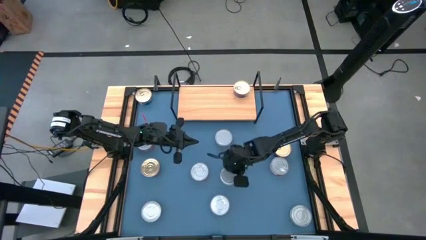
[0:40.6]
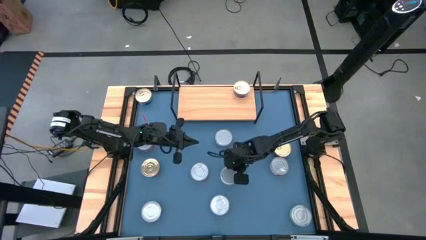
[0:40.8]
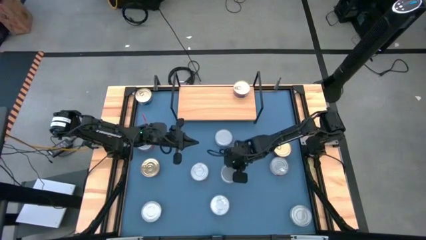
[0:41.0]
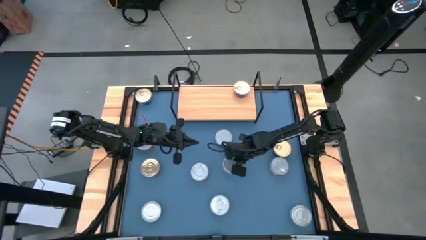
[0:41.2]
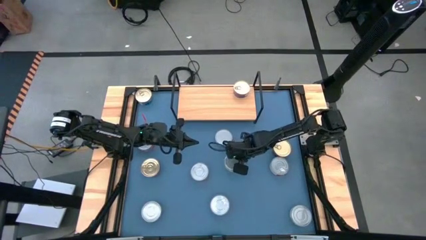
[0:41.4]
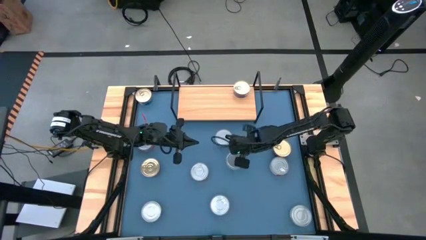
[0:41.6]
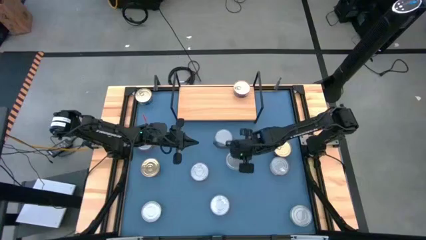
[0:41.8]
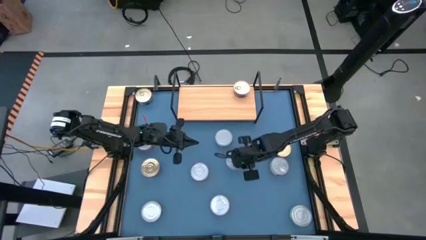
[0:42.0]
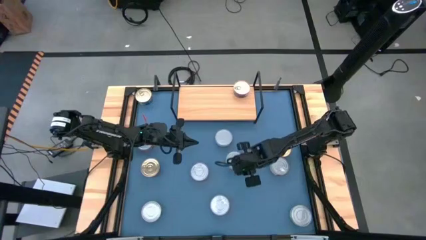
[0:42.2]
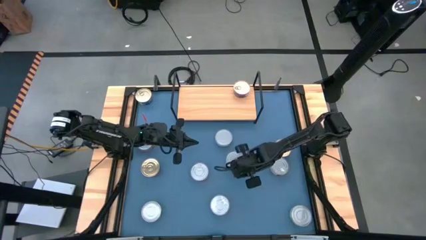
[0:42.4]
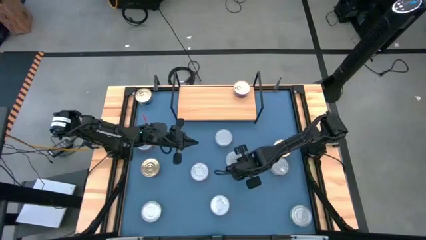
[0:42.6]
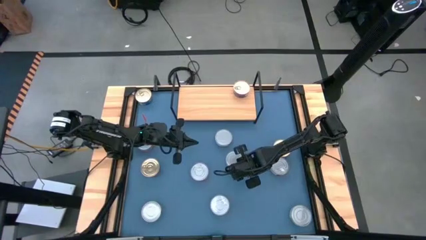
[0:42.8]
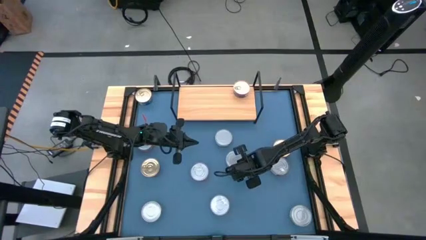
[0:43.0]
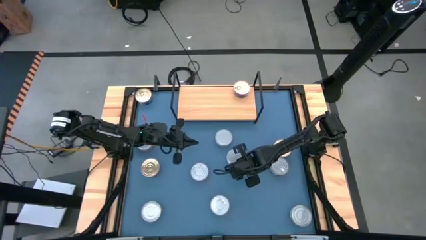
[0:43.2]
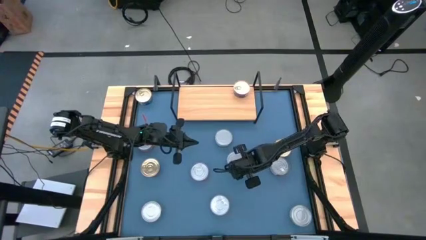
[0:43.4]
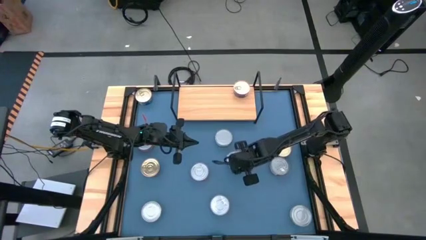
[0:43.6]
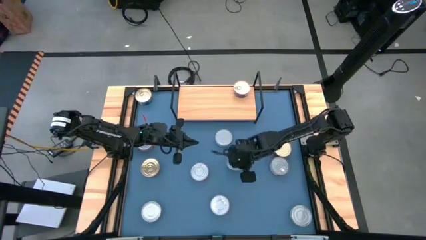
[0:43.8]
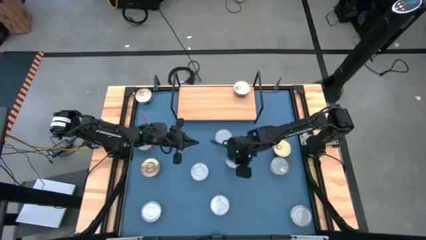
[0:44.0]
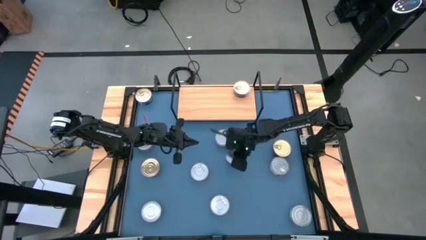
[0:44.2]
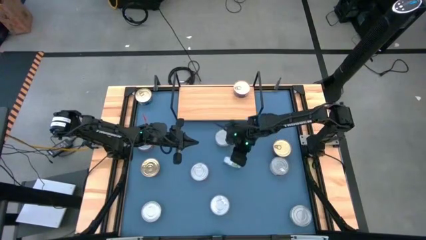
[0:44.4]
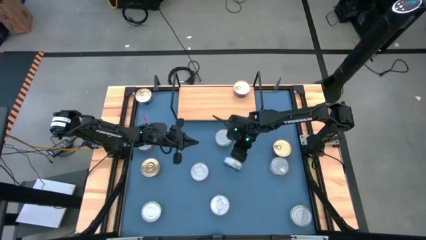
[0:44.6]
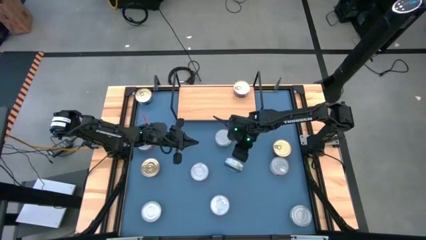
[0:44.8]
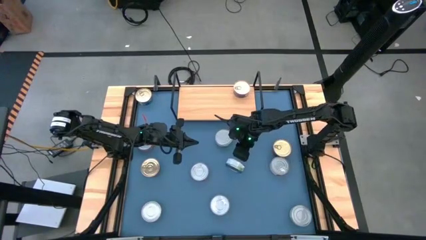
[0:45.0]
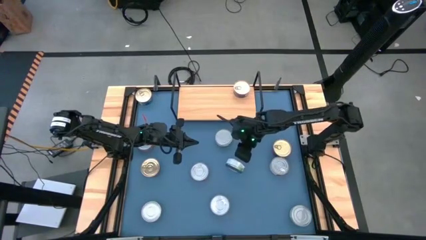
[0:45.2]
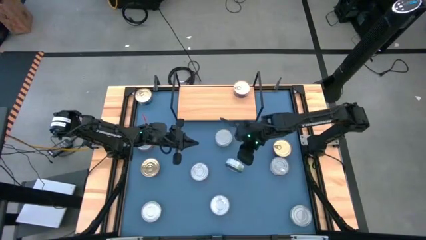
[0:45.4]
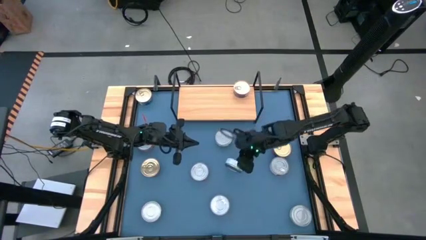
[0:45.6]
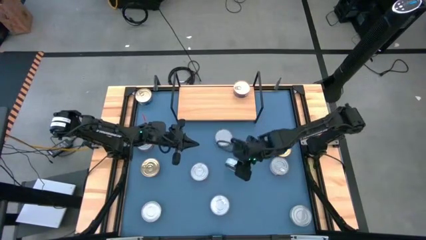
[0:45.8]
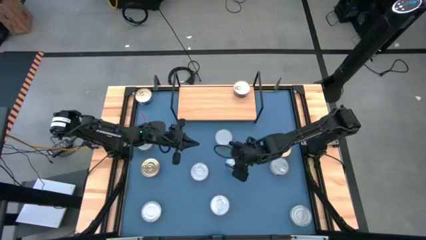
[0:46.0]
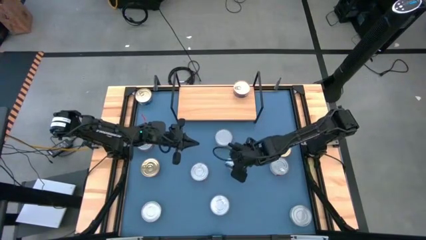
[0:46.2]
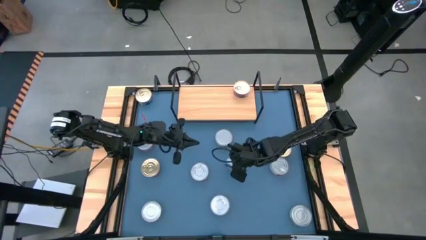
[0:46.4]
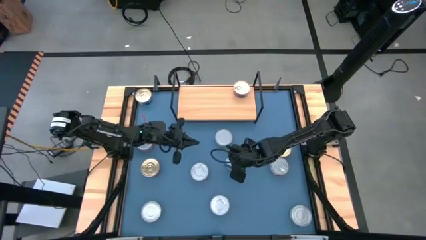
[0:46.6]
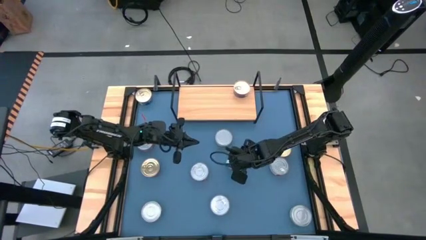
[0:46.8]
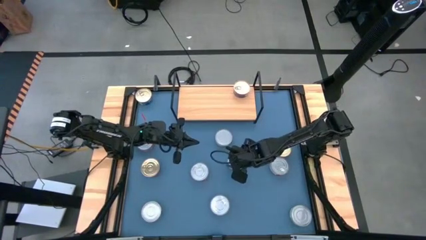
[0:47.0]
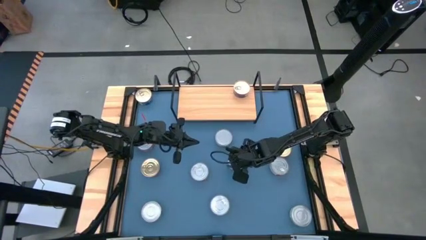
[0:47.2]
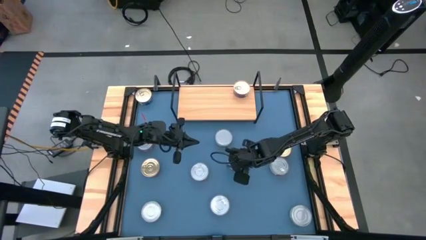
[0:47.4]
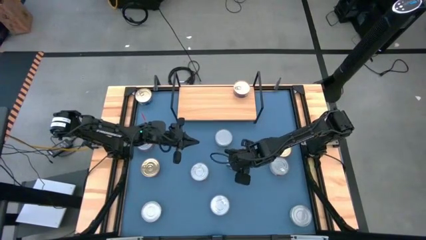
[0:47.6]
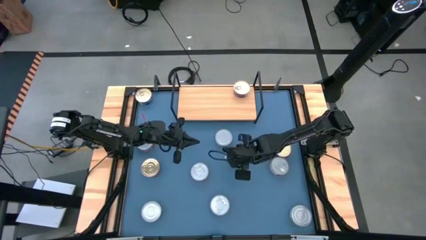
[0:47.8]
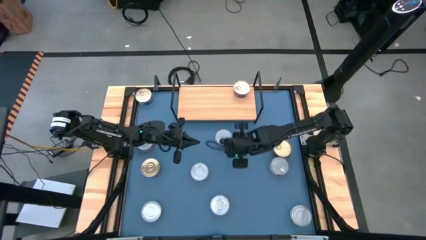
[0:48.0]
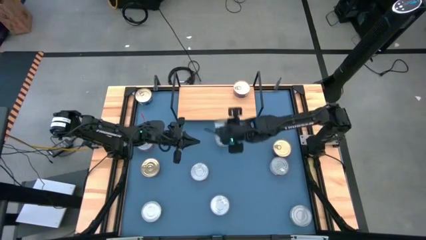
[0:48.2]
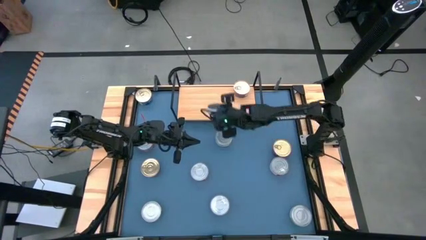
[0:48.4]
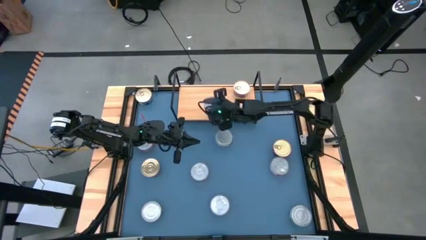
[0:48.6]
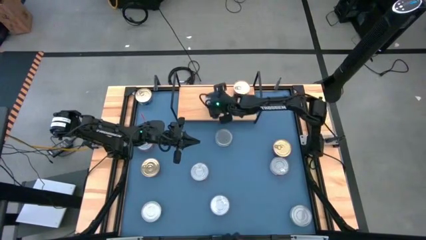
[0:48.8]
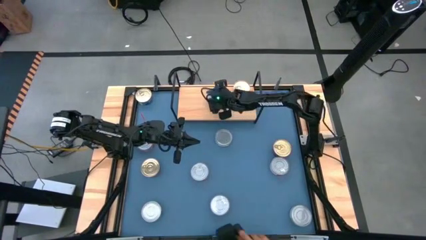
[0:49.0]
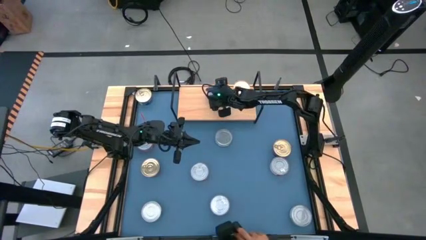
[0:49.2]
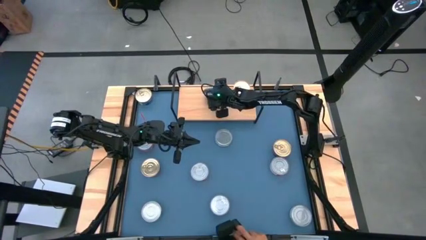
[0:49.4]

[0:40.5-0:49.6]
Task: Stack canned seafood by type on shelf
Put the green tuna can on the shelf

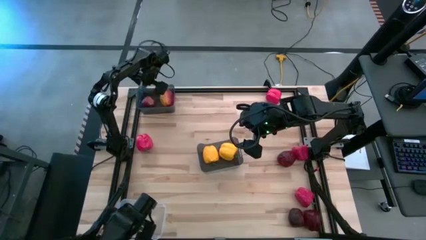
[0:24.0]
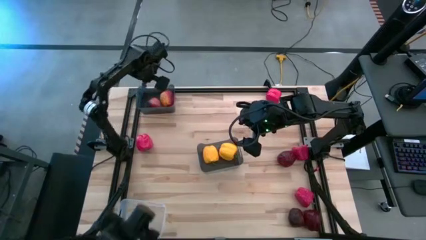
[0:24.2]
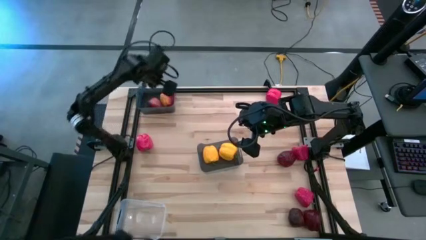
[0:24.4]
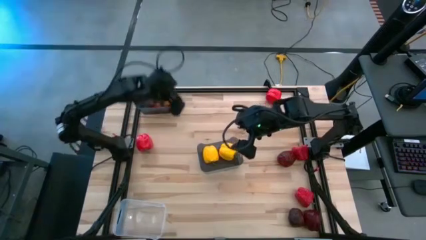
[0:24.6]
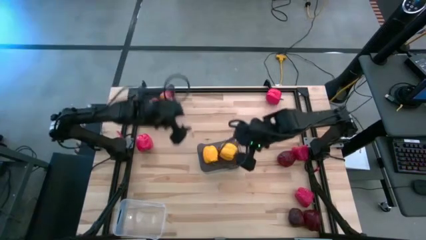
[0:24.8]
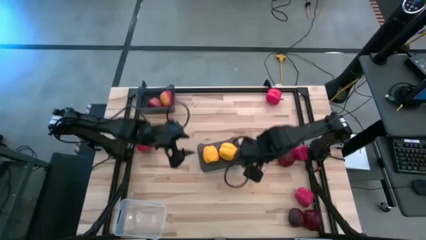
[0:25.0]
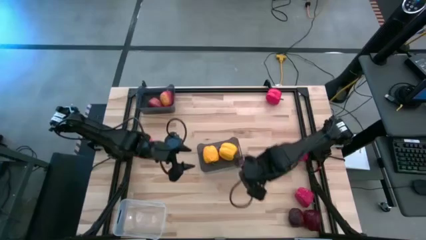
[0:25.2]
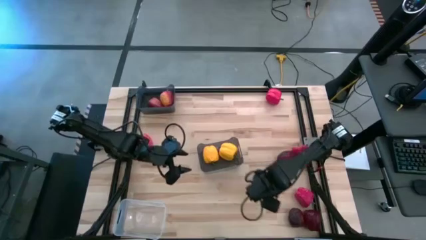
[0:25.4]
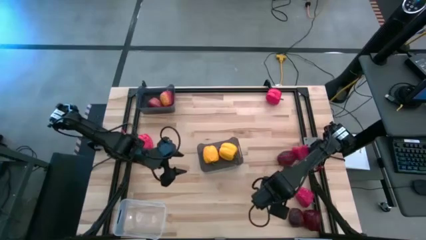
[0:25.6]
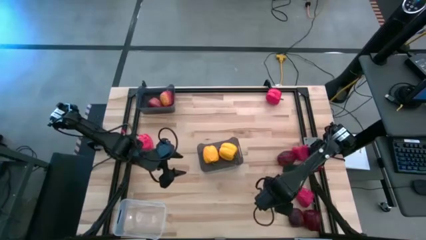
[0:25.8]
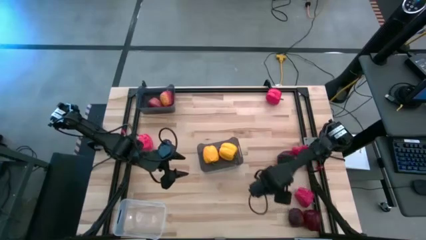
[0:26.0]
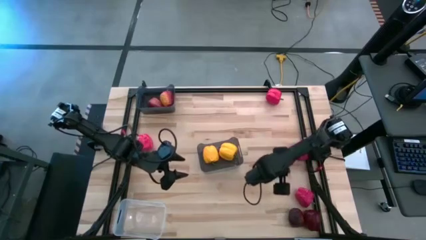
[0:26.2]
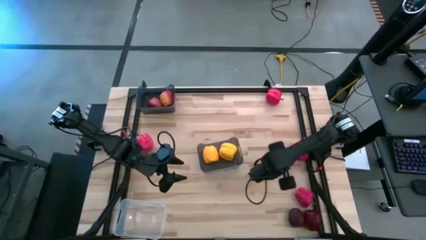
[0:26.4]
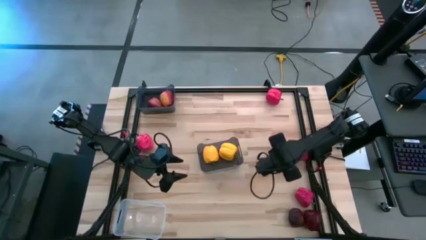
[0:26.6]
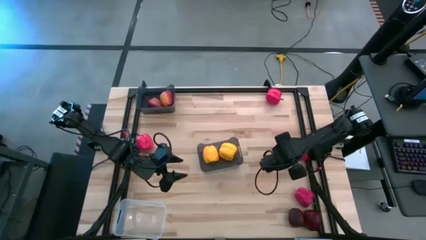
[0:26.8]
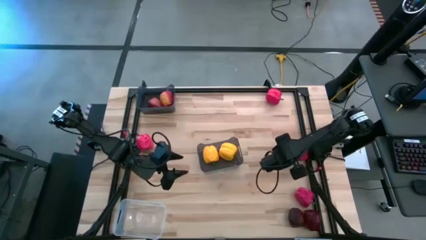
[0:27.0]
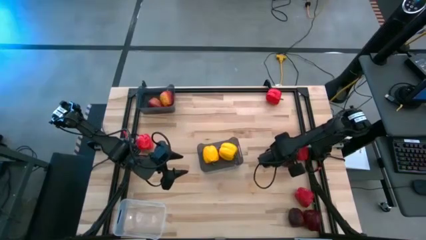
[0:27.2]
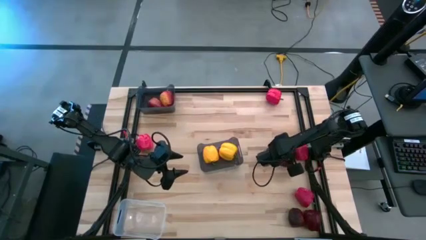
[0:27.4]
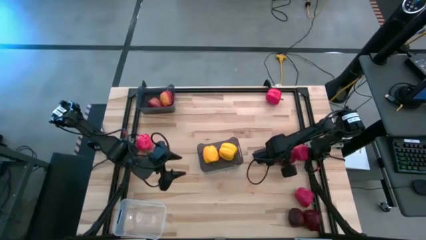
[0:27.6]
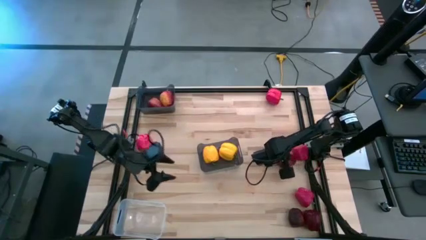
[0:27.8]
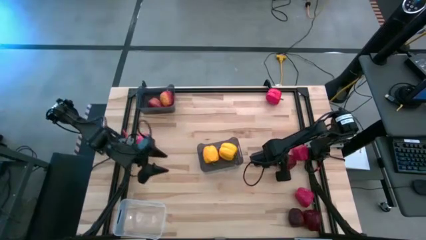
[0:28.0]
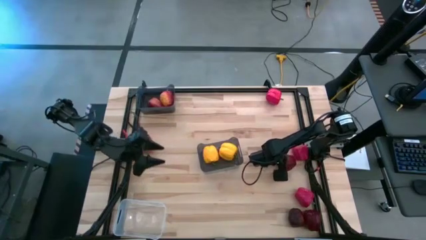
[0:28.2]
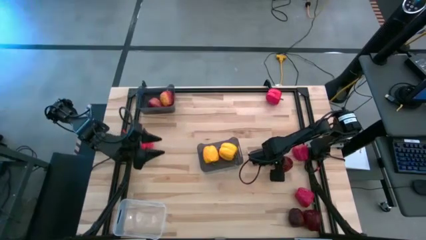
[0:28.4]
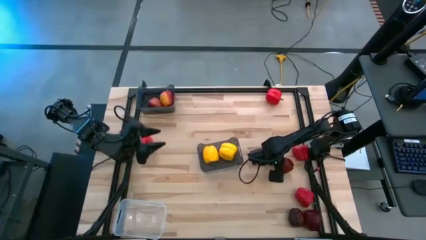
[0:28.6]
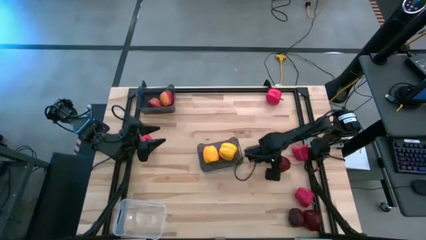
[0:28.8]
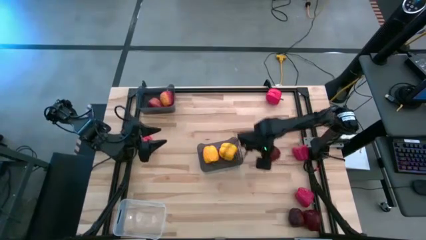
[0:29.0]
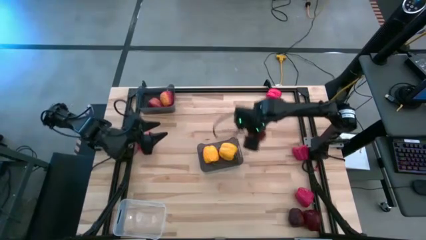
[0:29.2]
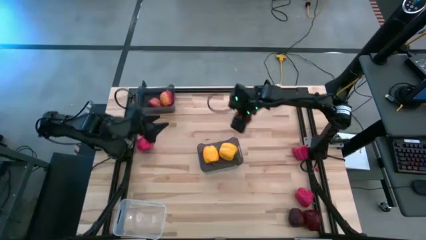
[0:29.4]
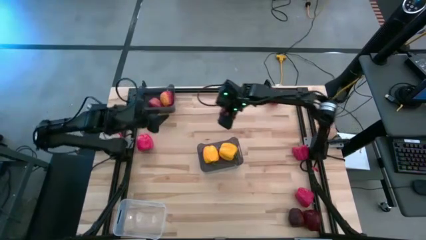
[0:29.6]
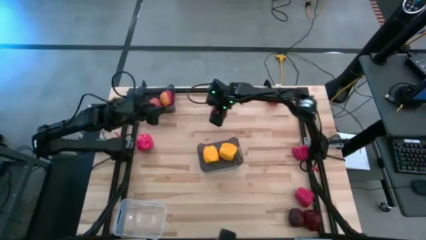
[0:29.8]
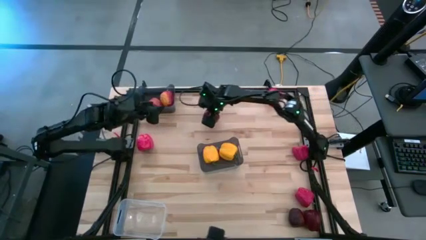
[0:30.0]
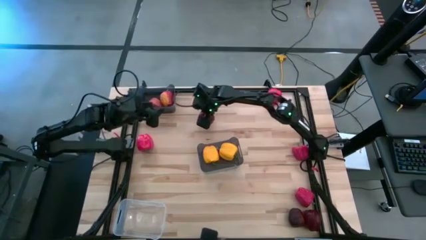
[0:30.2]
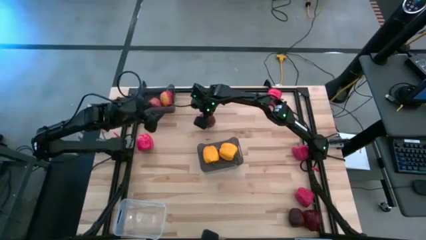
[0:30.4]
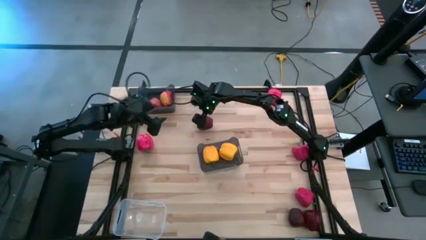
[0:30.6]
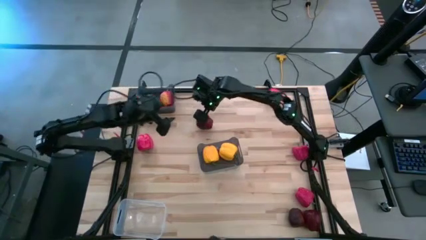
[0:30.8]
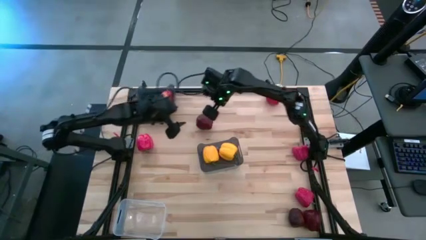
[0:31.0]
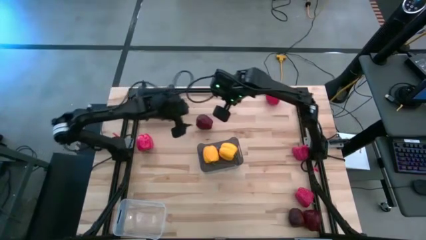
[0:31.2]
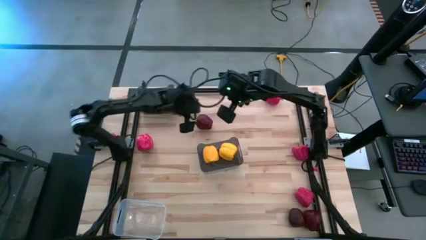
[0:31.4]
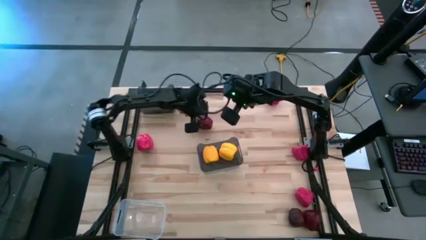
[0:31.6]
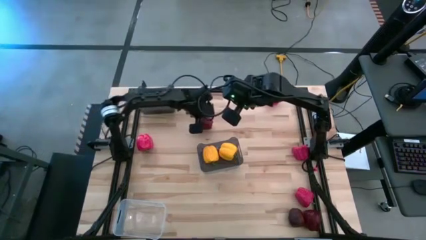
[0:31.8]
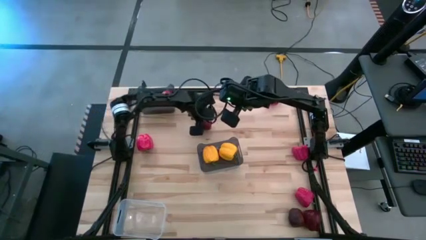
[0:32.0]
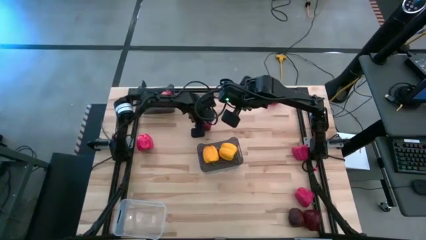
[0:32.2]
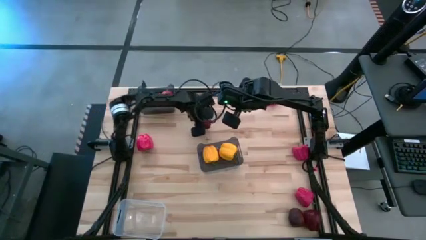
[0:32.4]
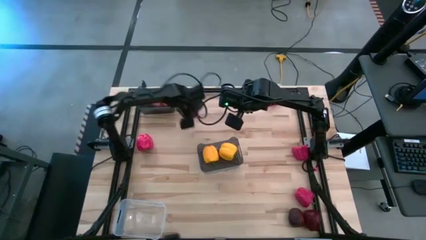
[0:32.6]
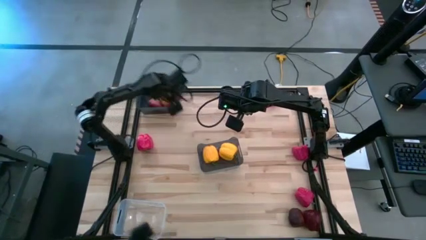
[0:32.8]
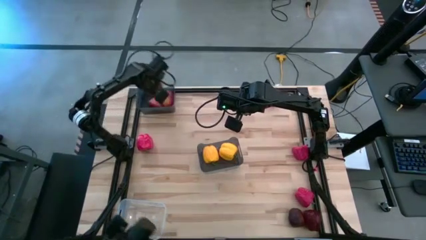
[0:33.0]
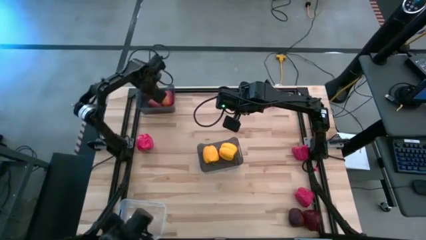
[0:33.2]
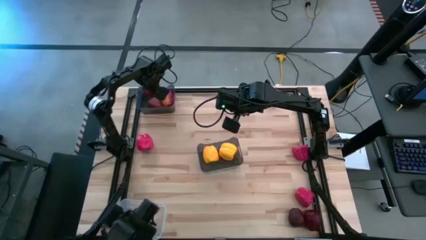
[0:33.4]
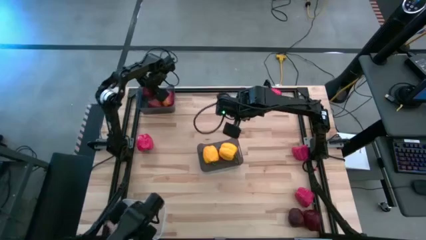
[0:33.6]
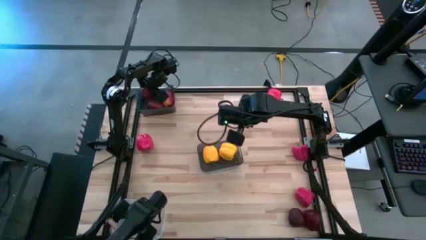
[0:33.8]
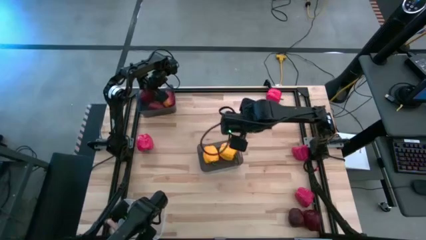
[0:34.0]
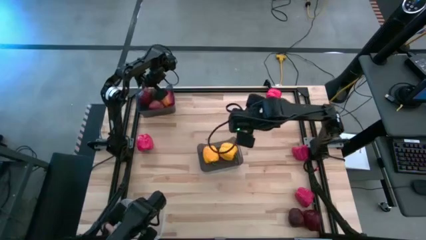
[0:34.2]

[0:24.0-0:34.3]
Task: Sort produce into baskets
Put the top apple into the top black bin
